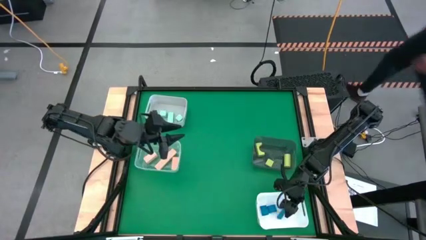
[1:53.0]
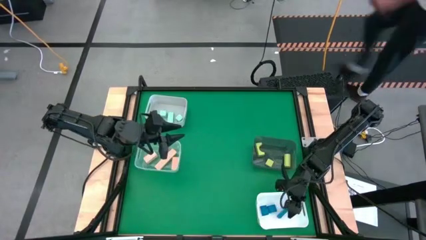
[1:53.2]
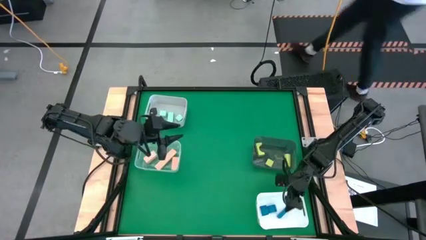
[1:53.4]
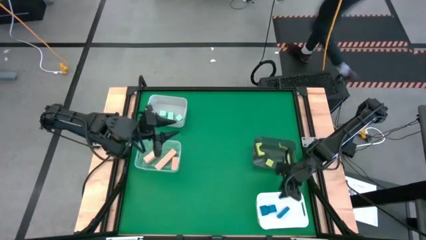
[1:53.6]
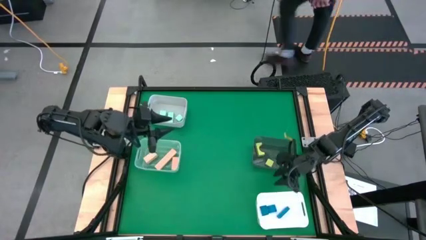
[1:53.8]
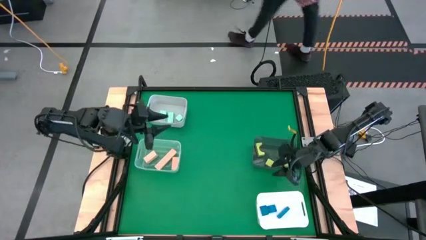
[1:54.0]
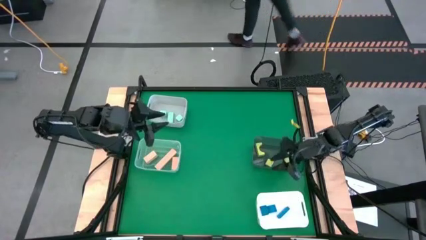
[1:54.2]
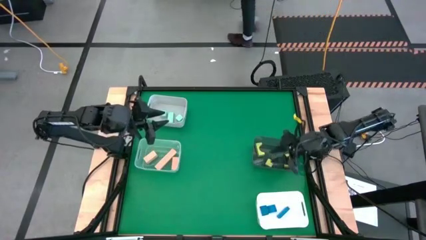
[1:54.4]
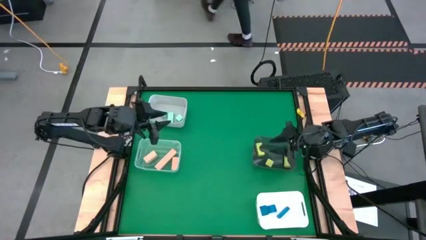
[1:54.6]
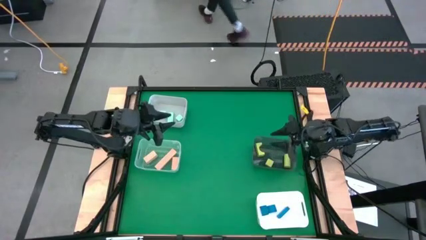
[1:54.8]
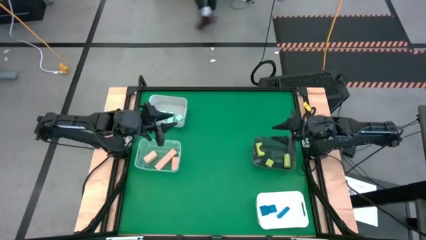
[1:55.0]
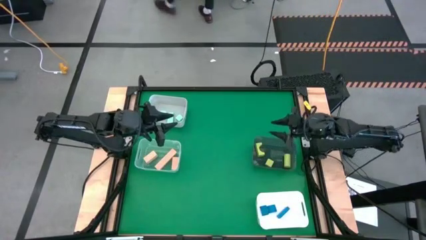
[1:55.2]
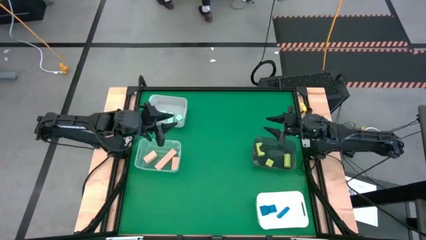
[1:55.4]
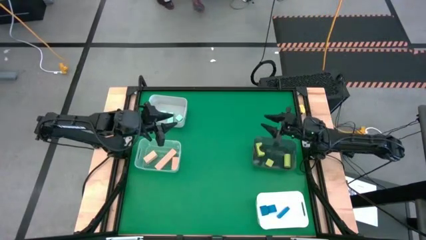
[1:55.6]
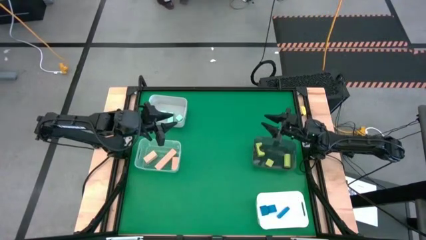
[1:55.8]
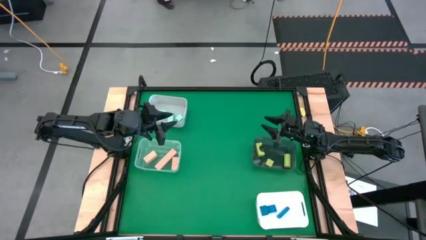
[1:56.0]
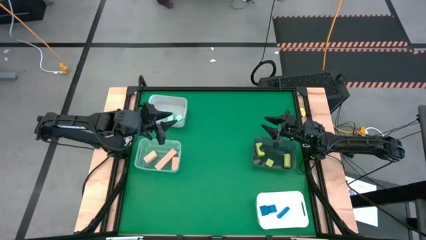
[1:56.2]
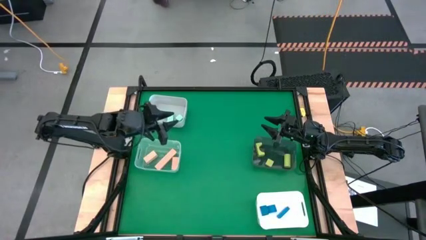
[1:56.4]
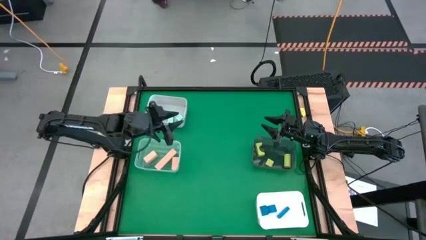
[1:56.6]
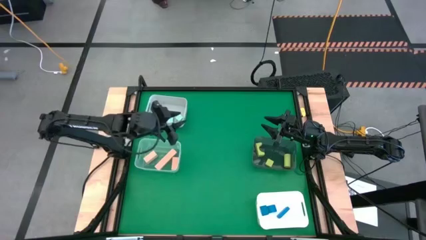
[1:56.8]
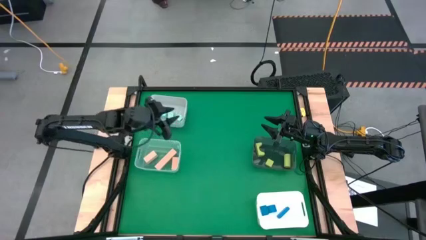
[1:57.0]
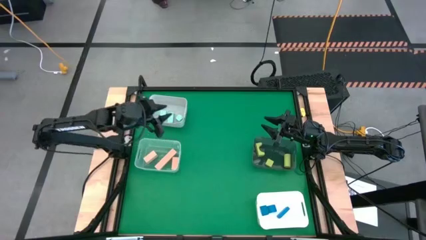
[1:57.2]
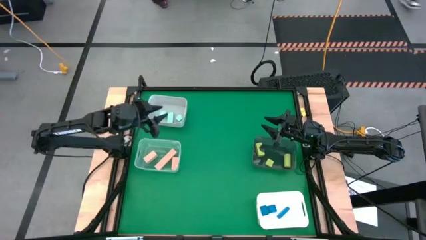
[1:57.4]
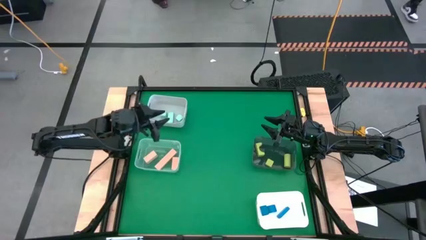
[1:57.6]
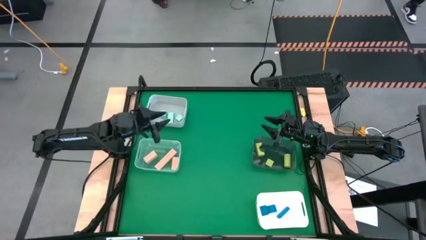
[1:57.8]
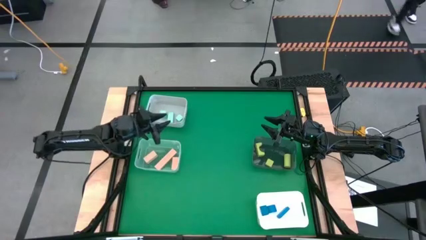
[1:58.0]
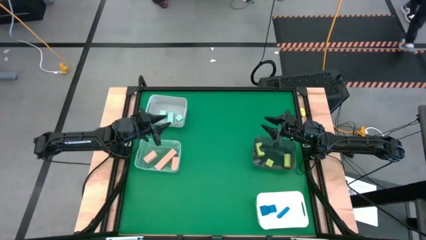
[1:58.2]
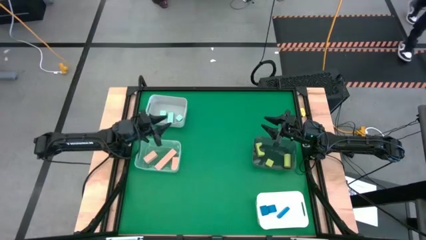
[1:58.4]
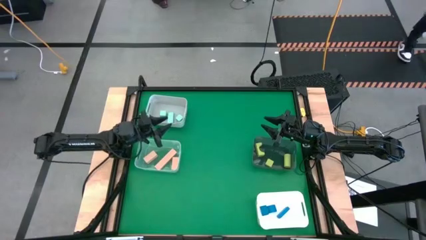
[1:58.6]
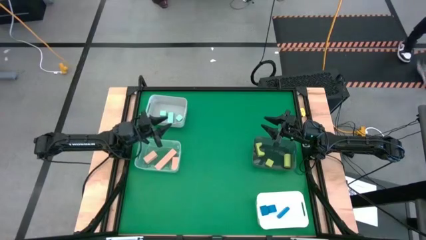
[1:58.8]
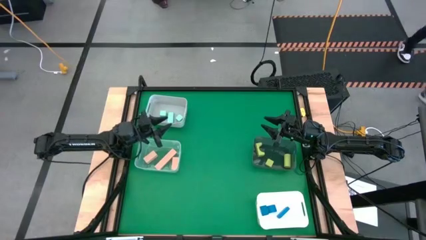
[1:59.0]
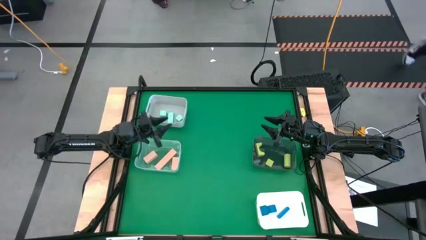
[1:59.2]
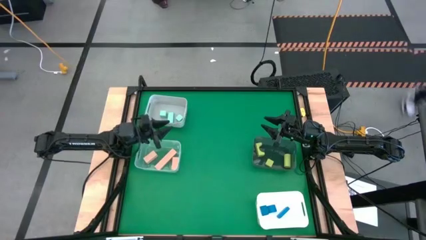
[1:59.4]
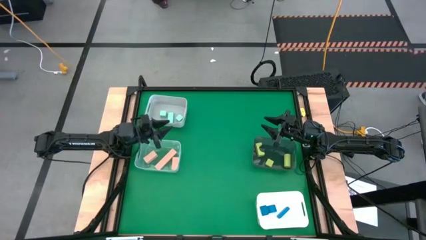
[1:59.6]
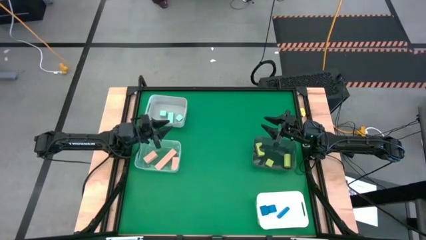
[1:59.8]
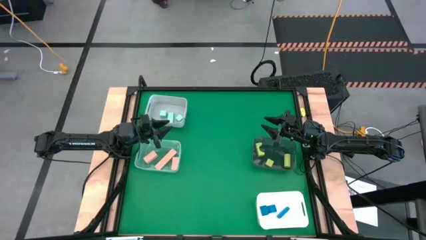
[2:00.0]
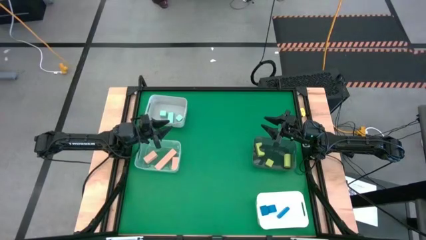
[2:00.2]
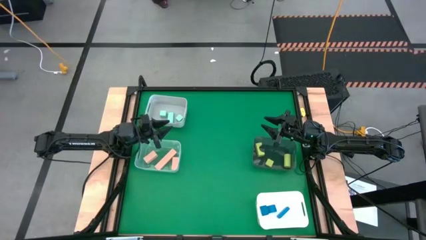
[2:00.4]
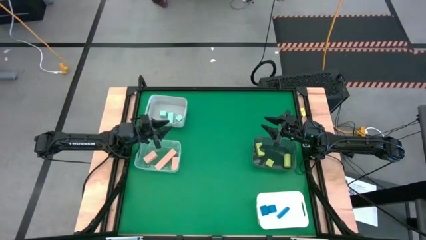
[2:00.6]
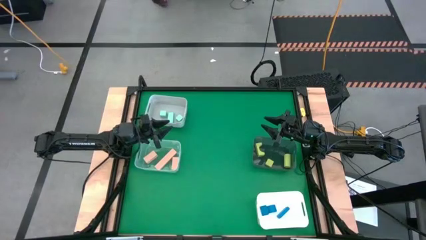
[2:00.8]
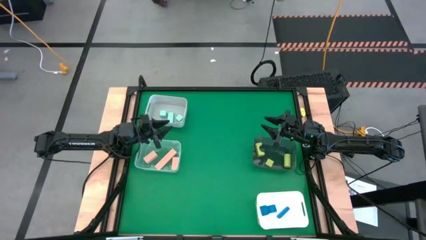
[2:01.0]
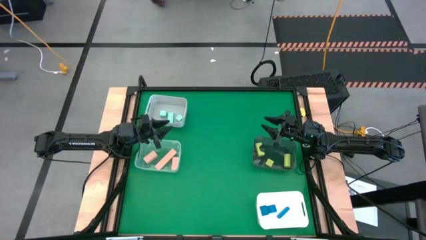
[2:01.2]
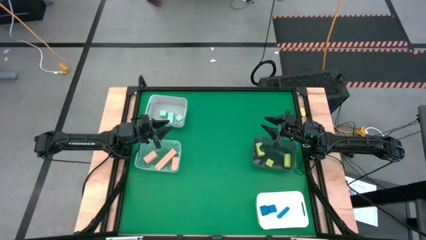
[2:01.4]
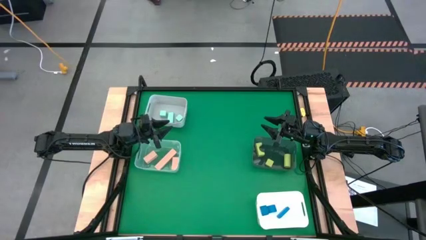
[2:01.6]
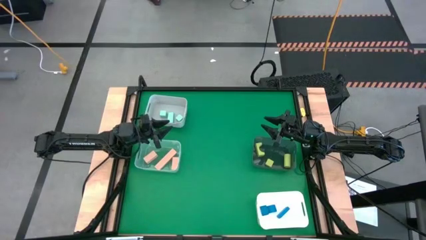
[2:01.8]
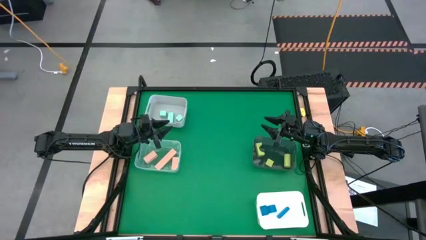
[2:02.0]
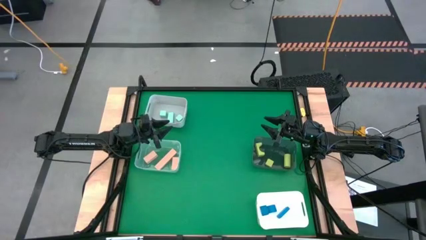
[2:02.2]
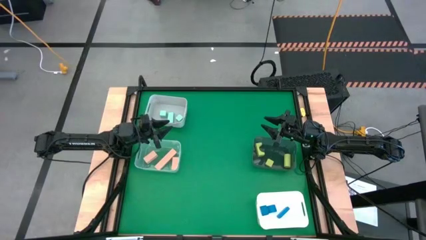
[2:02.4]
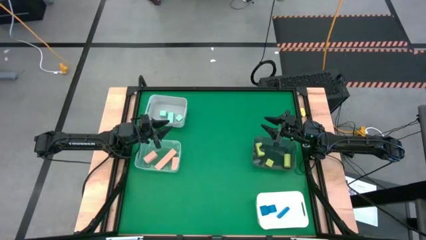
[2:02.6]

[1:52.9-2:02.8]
Task: Sort & place blocks by color
Return to Home Position

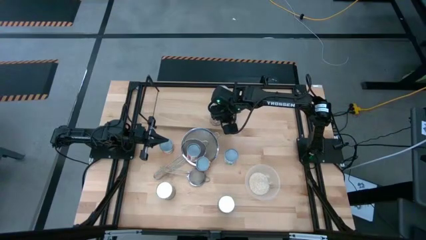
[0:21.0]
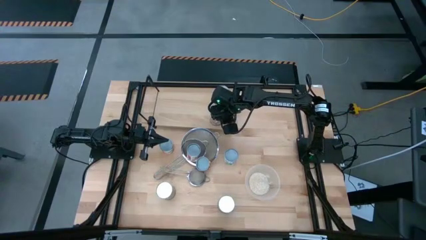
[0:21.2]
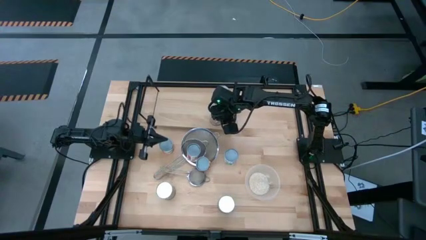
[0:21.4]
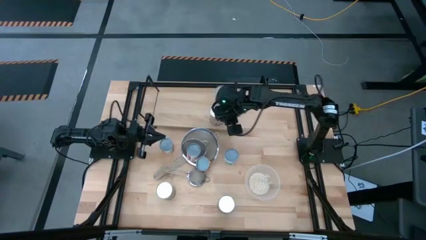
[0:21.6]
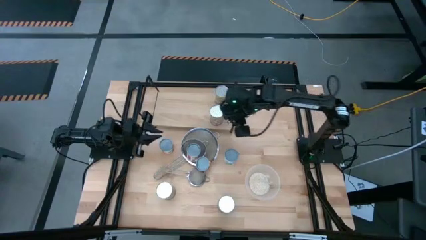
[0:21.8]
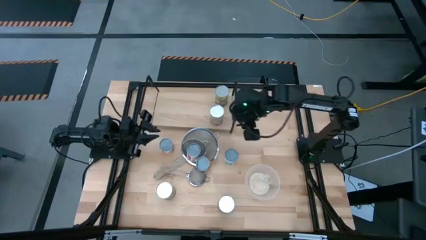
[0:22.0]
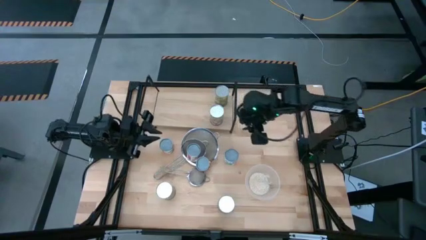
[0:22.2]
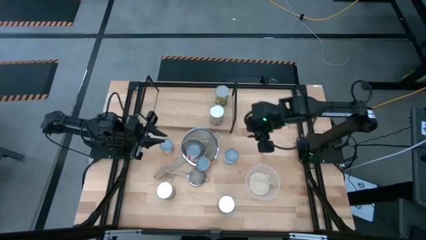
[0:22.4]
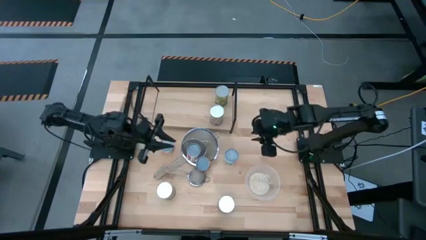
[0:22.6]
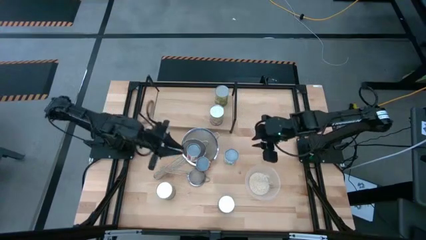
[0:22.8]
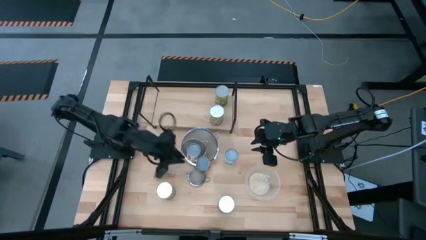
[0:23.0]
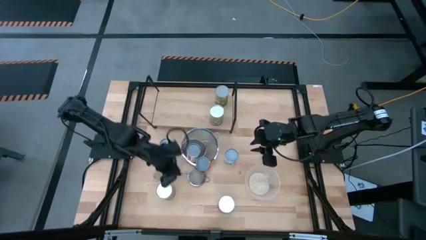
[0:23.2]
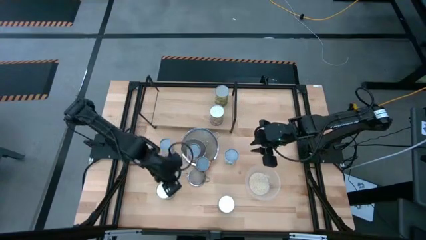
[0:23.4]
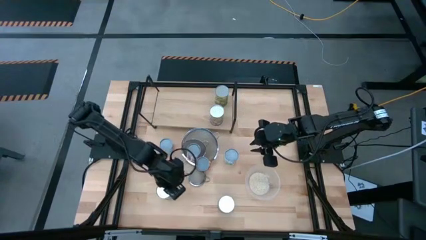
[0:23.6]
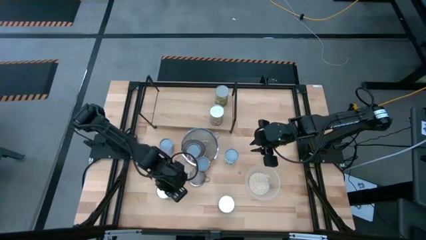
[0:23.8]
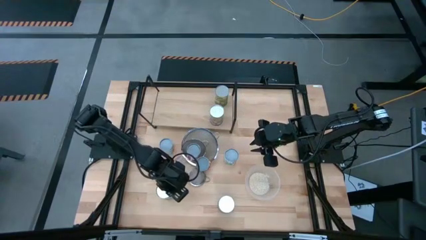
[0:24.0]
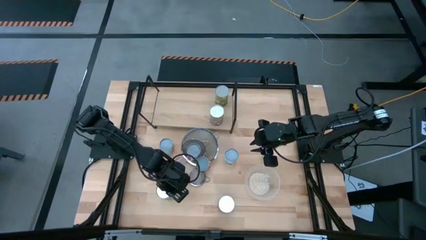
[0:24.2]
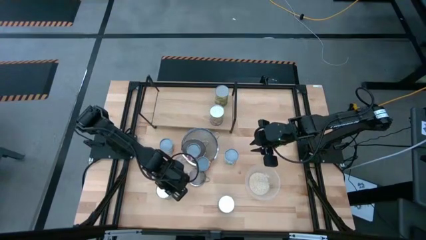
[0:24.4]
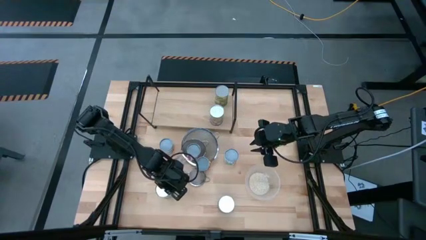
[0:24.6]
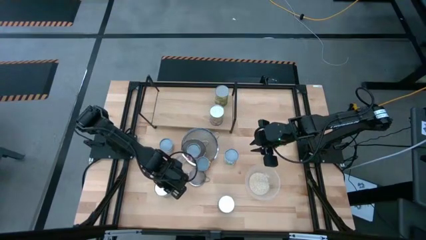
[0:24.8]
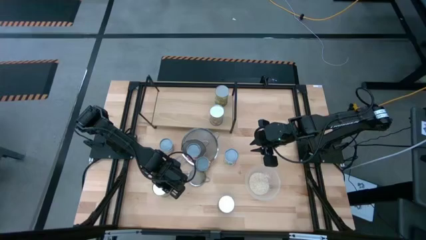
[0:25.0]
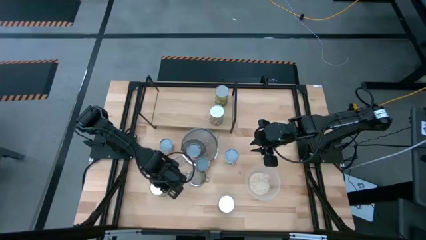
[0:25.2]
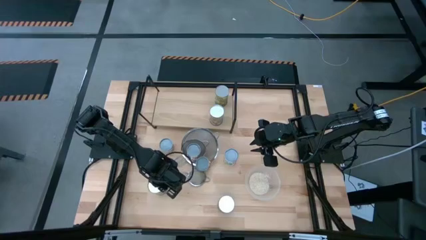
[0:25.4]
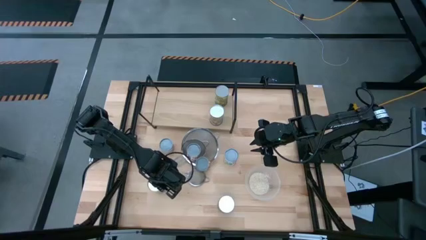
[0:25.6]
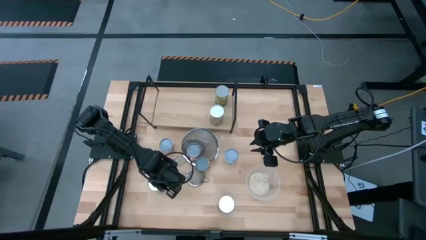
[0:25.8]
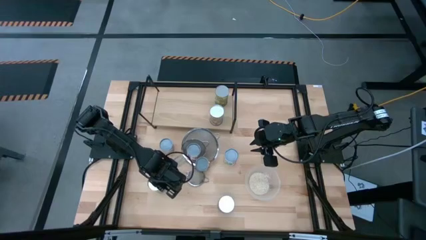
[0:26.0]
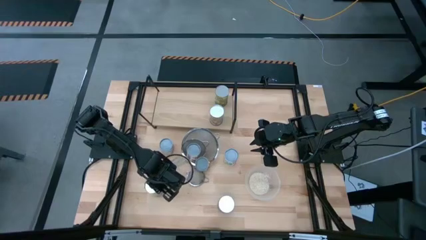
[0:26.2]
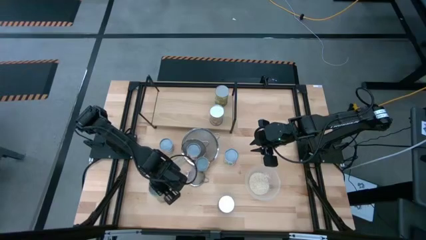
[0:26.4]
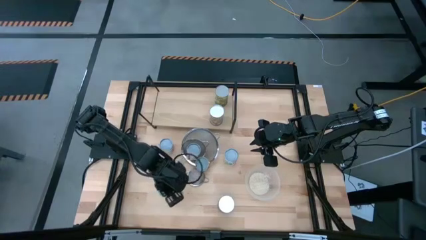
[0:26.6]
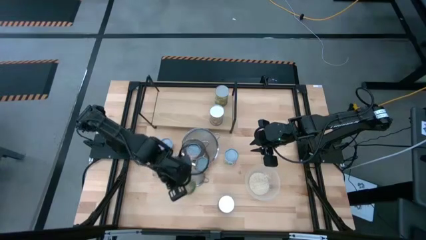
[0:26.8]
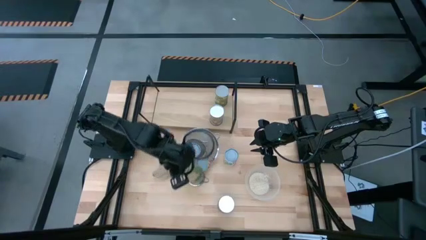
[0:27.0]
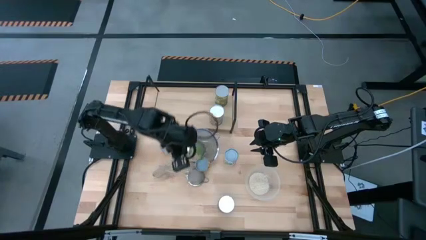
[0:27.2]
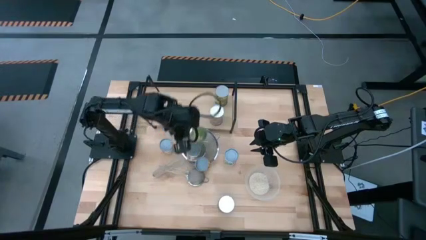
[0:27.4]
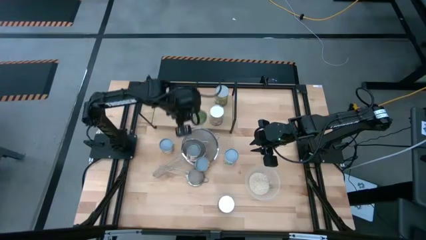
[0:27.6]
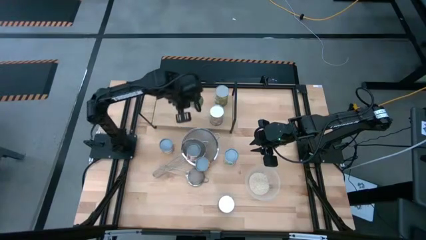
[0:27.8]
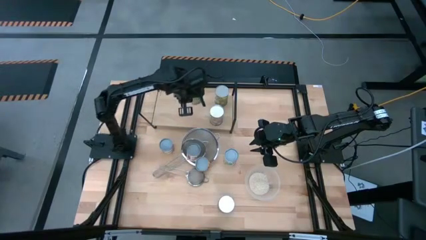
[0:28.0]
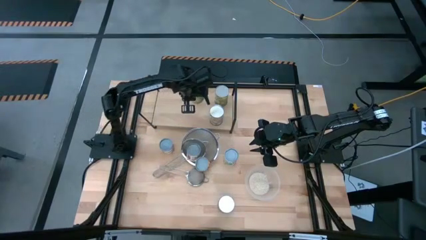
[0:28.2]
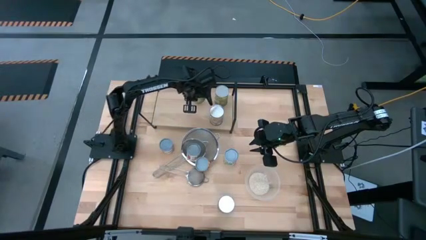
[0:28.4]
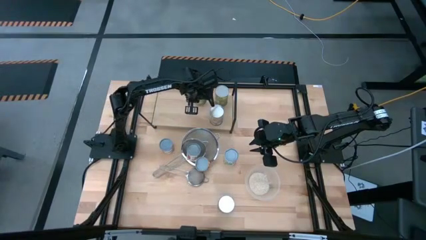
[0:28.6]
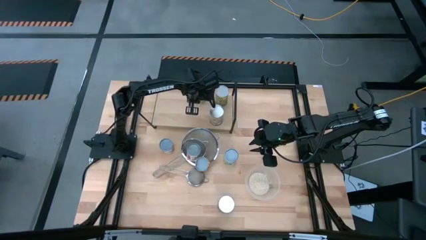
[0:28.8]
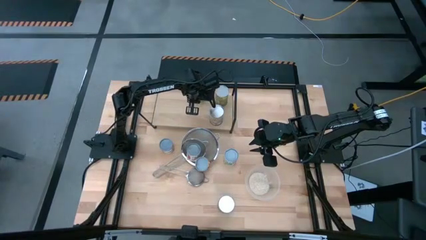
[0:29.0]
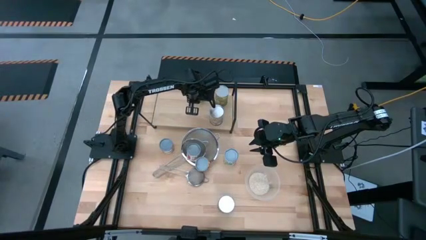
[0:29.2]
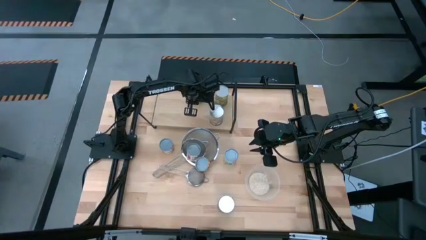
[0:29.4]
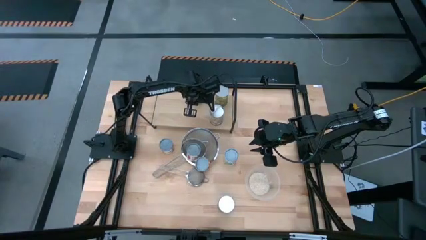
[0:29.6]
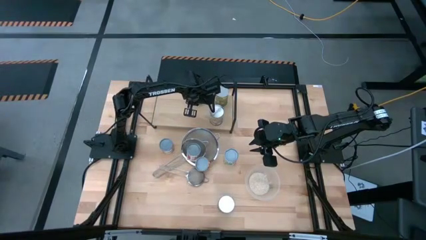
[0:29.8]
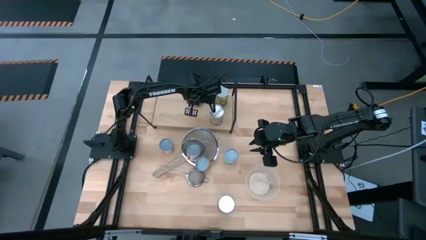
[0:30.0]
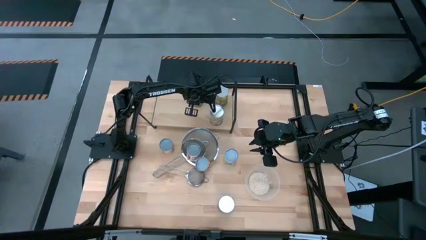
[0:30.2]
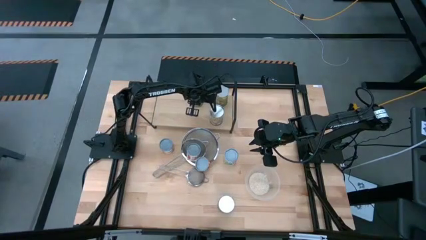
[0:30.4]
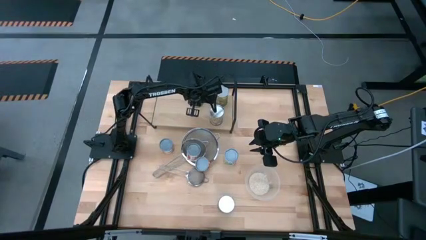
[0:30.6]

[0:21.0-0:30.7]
Task: Pick and place cans onto a shelf
Put the large canned oranges on the shelf
